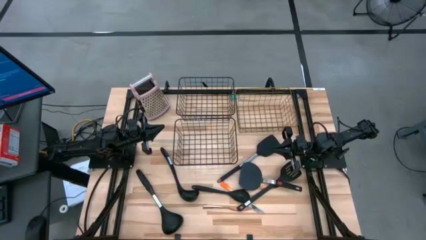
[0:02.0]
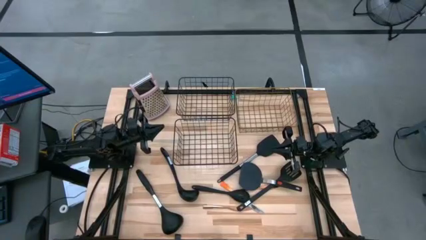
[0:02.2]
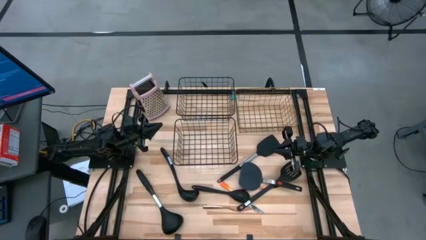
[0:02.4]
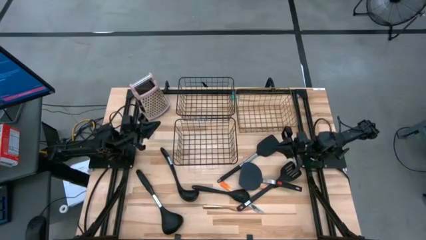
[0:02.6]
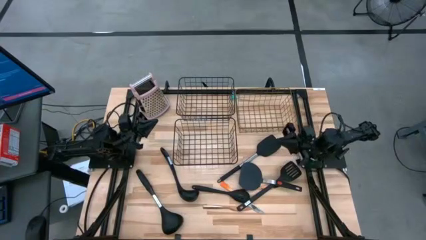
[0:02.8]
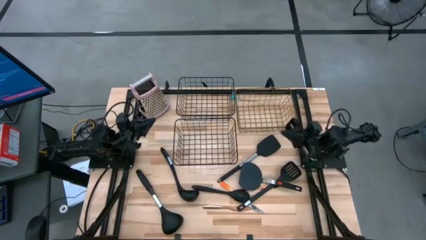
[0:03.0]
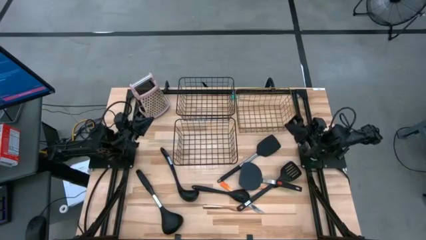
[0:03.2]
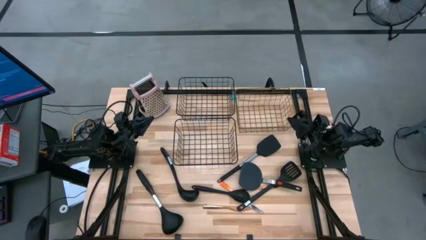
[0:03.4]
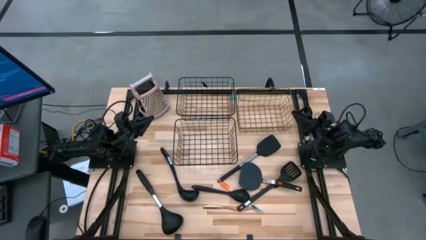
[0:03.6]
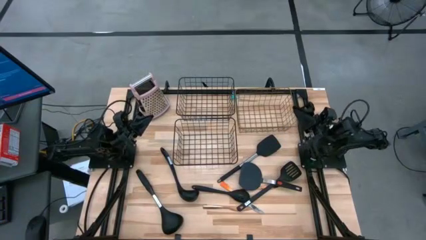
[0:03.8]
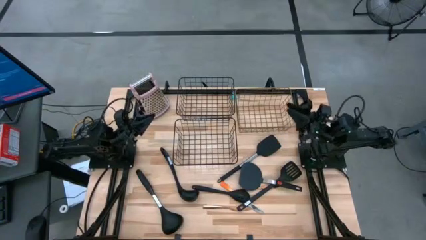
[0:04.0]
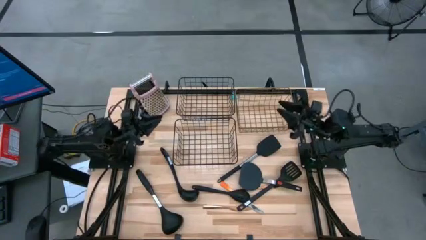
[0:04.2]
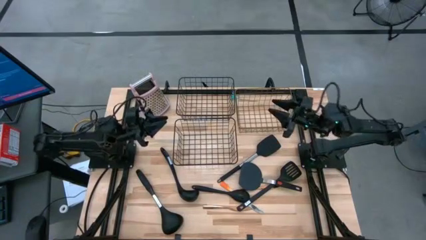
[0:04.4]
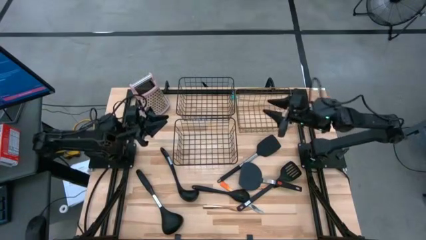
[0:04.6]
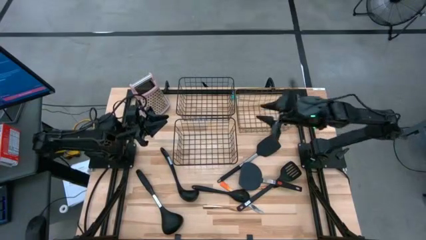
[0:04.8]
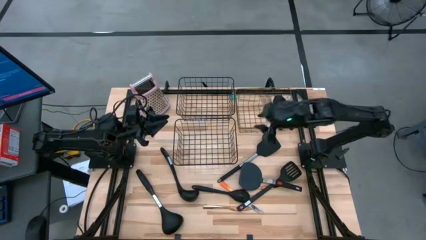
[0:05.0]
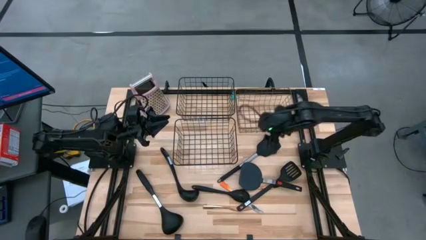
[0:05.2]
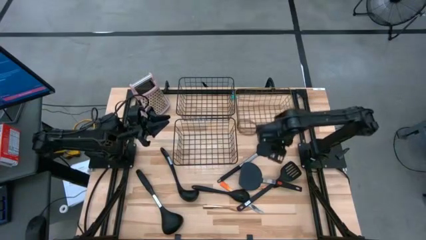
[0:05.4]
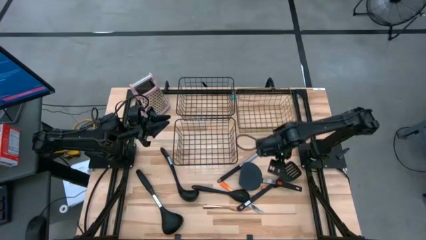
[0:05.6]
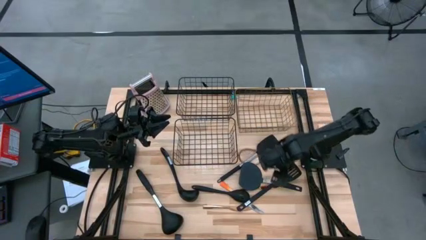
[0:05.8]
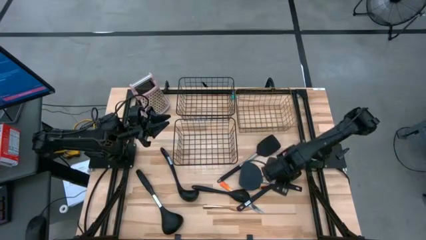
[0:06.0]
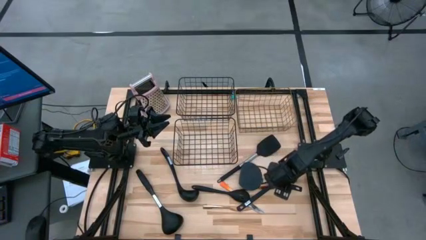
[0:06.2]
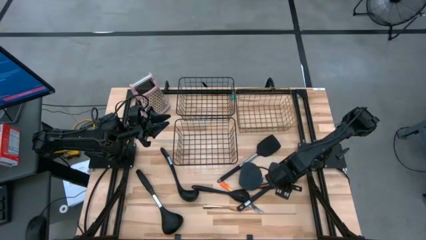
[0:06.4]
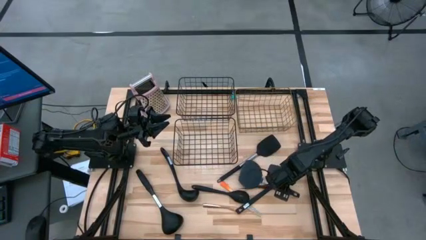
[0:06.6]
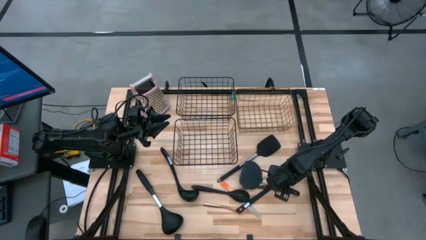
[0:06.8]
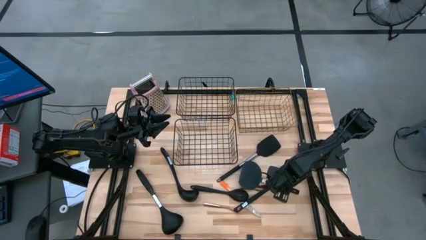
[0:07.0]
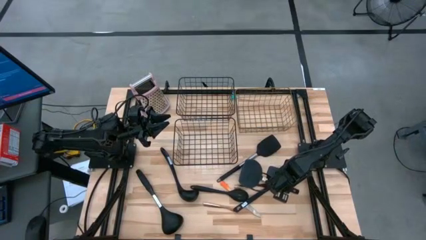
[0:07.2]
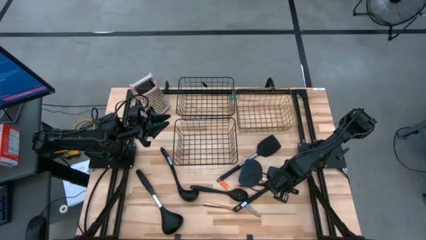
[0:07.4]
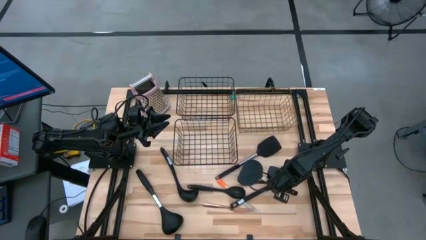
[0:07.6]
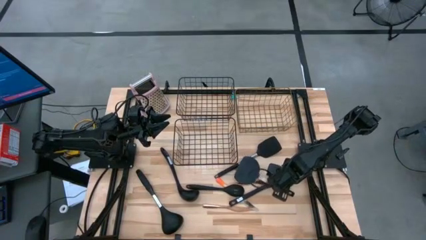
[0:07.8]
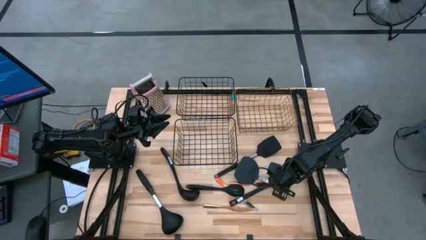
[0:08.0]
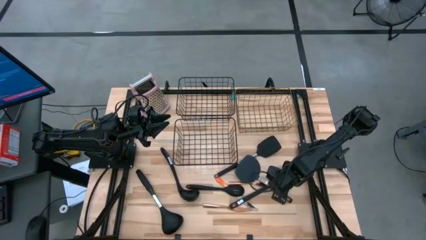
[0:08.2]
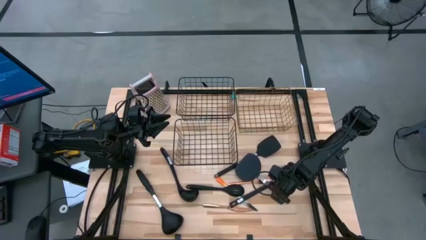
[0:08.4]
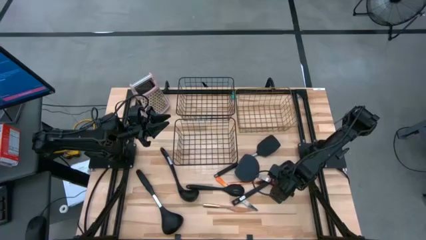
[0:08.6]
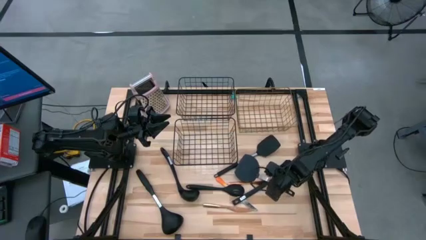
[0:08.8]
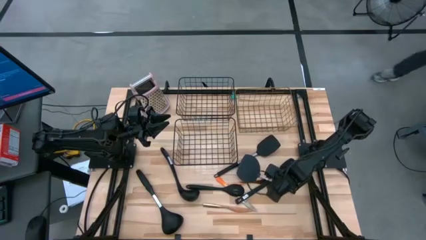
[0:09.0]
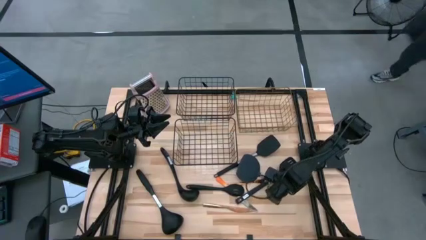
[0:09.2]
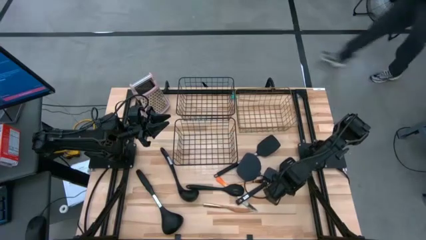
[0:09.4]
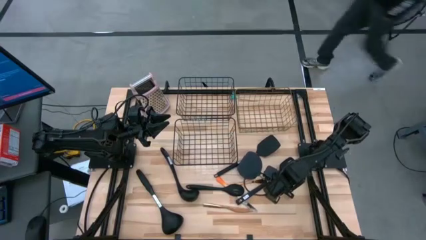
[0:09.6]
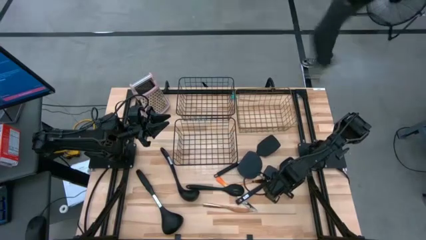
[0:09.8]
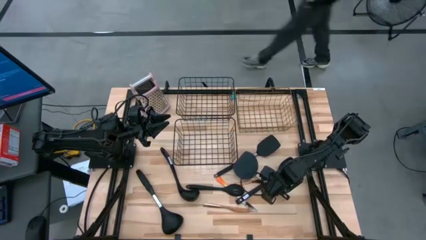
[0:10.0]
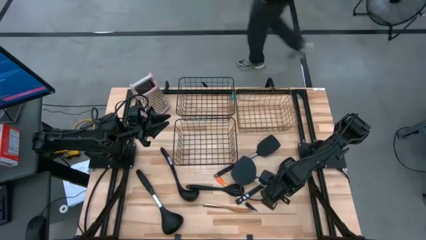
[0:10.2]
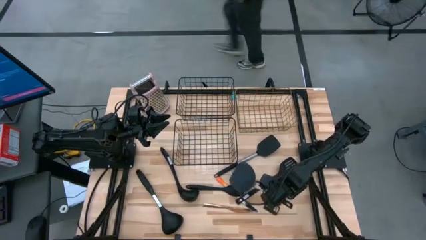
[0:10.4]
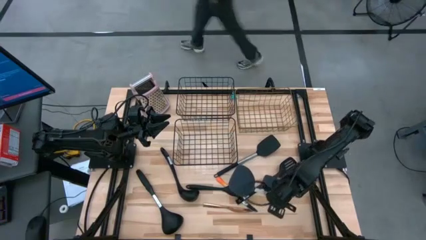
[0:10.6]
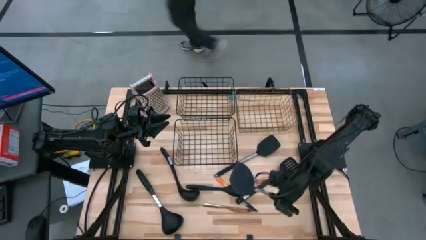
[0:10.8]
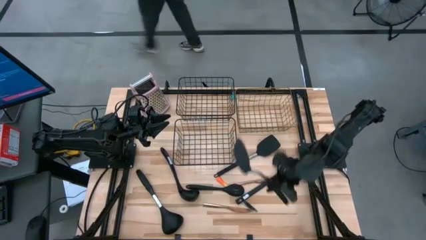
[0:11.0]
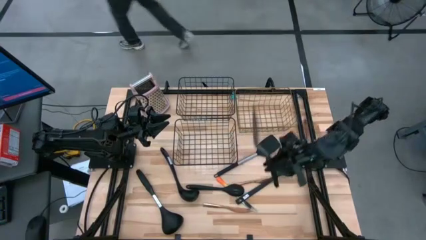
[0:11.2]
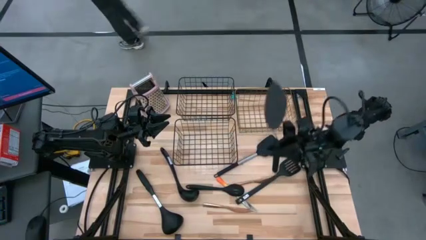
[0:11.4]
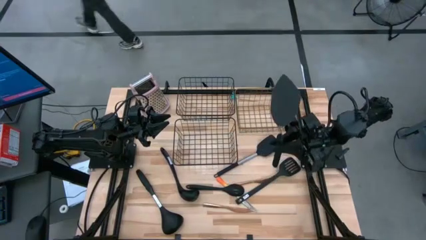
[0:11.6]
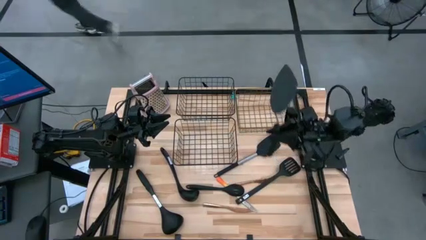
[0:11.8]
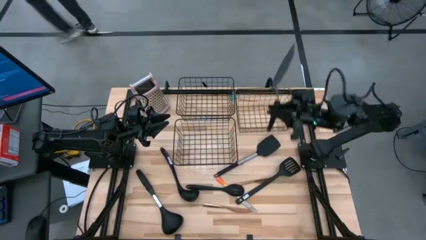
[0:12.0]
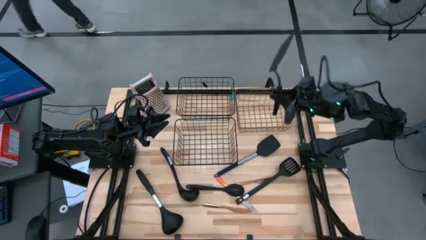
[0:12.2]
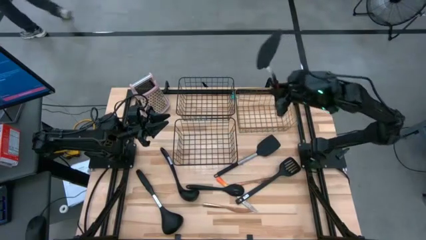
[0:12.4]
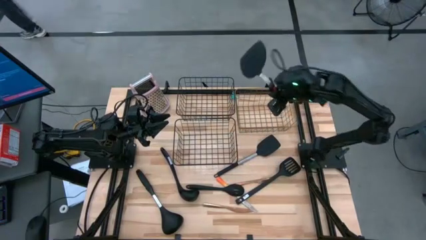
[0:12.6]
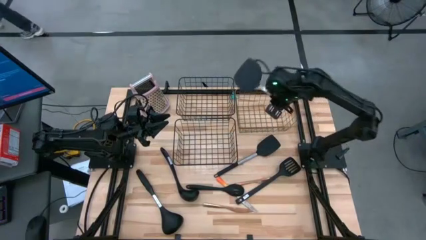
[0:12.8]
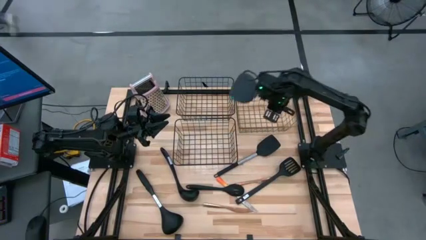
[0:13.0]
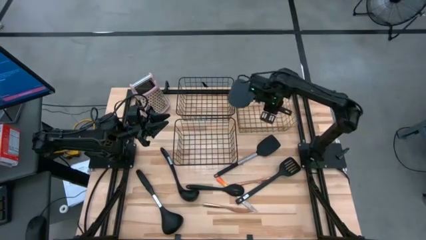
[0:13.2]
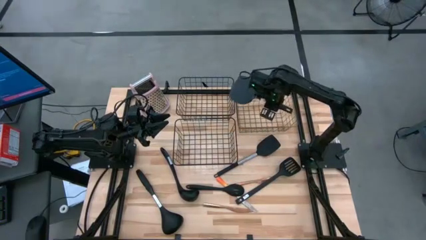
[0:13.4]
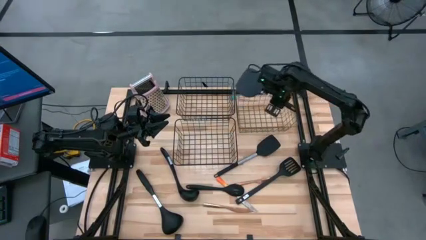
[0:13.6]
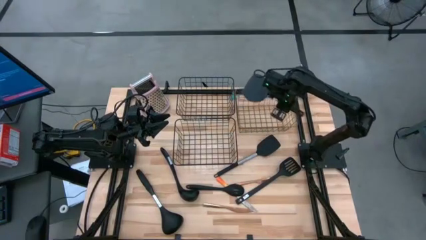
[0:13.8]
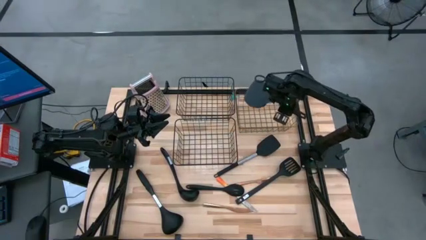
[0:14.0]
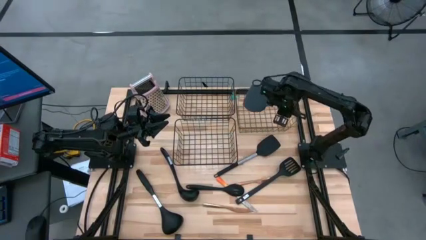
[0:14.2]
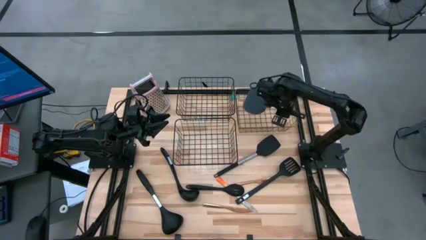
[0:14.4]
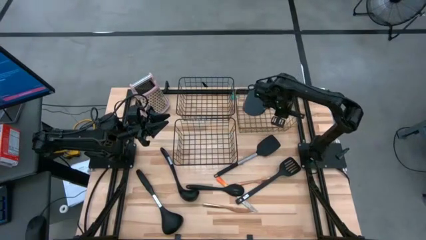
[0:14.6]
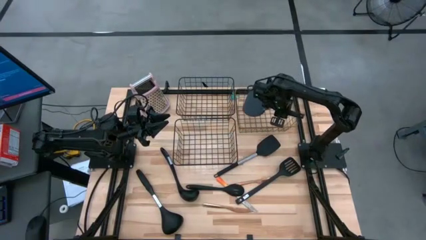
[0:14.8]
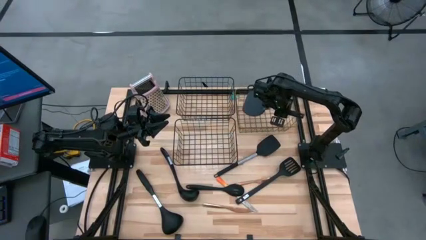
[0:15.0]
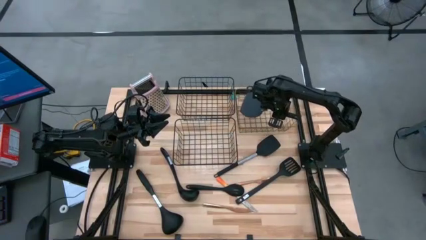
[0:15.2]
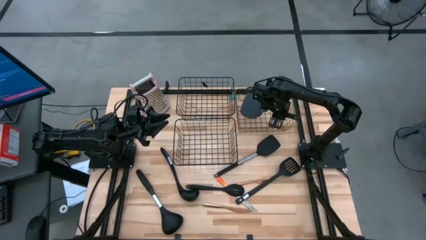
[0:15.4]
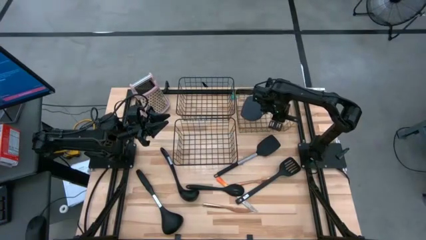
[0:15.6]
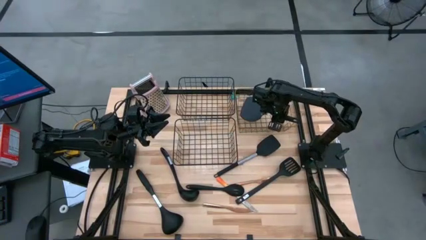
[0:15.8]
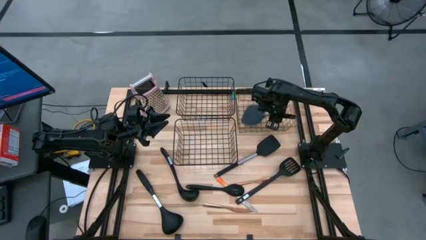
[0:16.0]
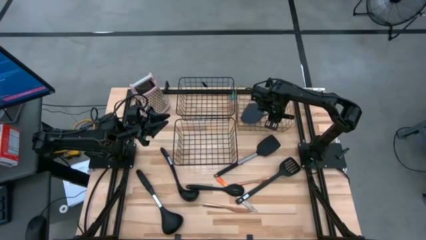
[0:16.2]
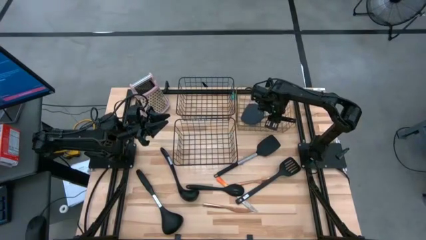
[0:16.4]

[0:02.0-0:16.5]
Task: Pick & Place Kitchen Items
Put the spatula into the top right wire basket
